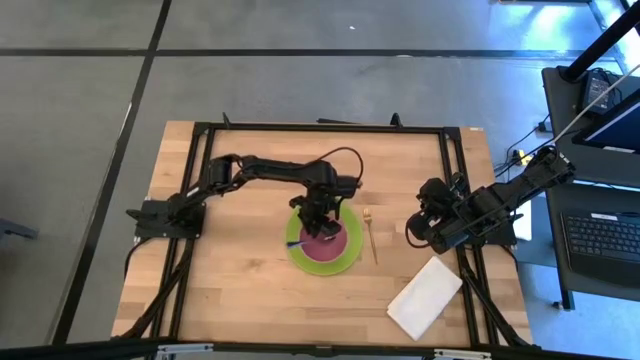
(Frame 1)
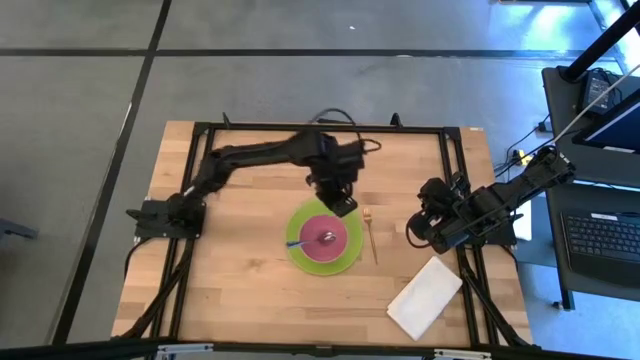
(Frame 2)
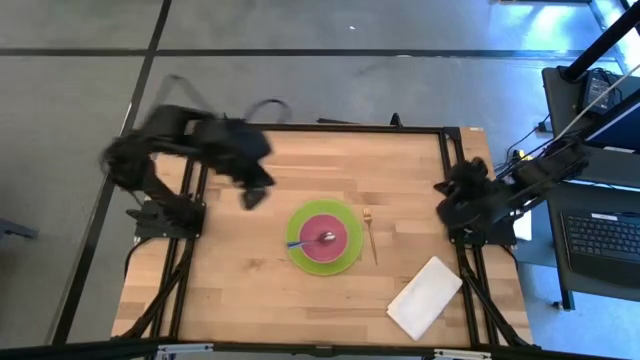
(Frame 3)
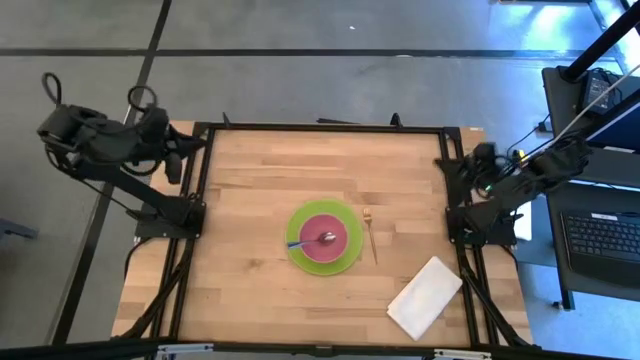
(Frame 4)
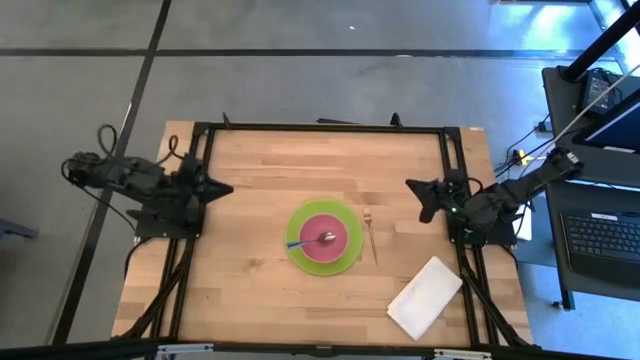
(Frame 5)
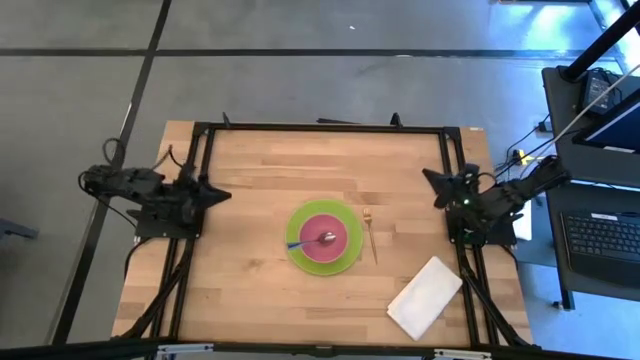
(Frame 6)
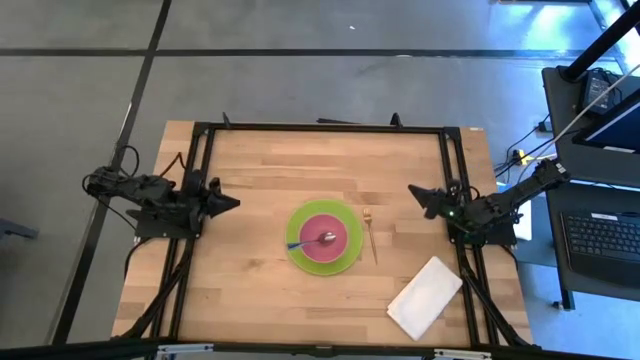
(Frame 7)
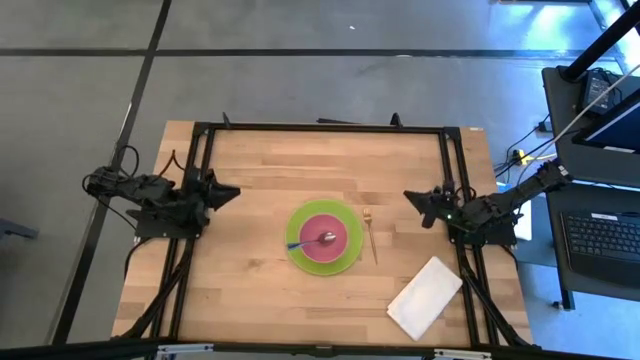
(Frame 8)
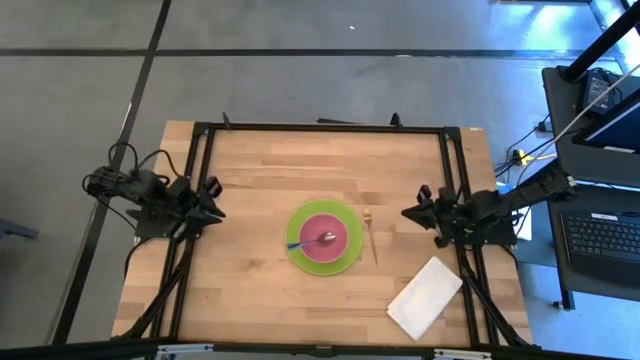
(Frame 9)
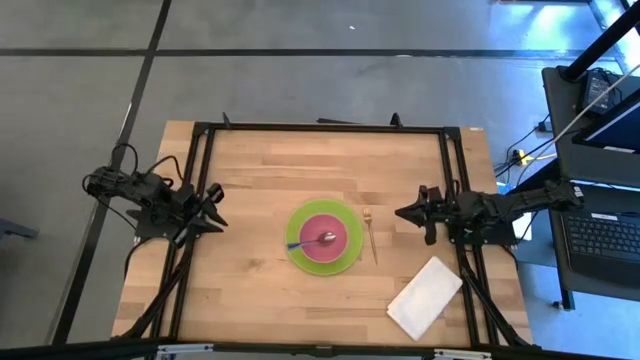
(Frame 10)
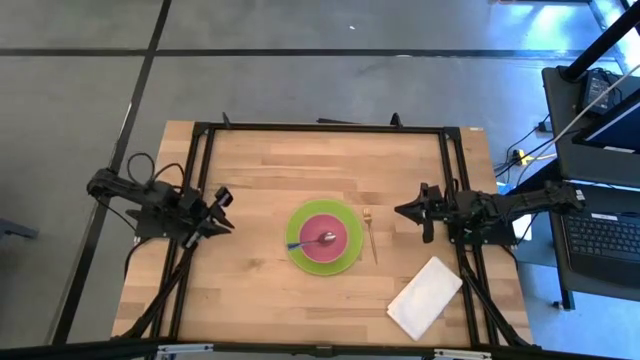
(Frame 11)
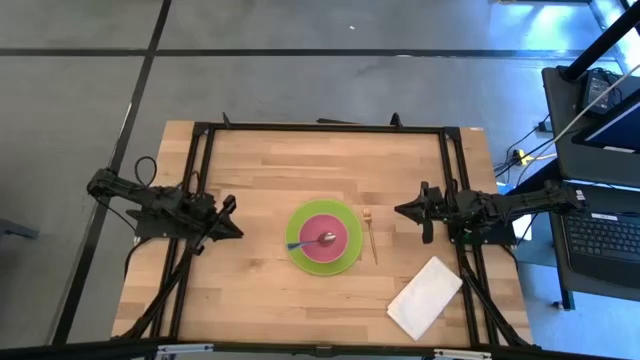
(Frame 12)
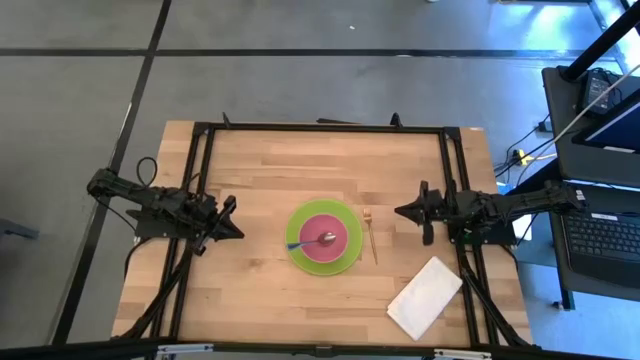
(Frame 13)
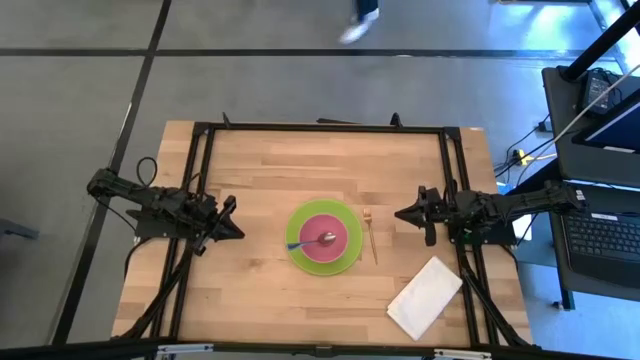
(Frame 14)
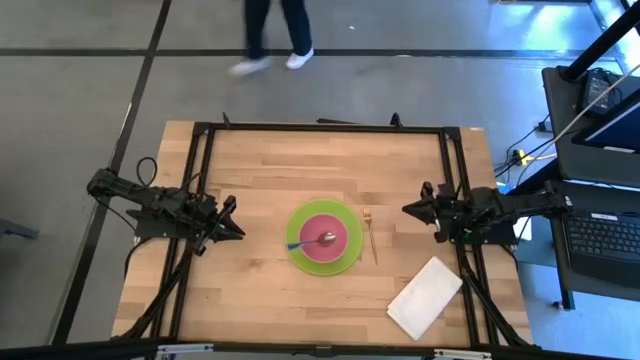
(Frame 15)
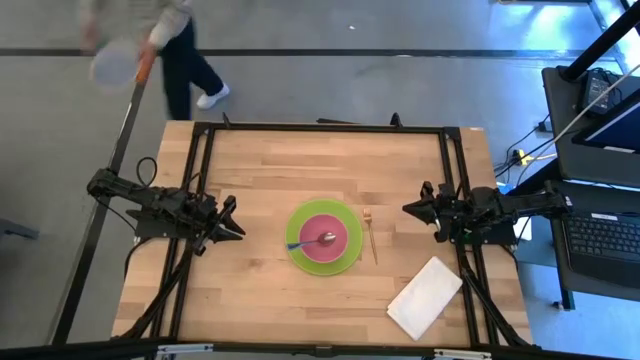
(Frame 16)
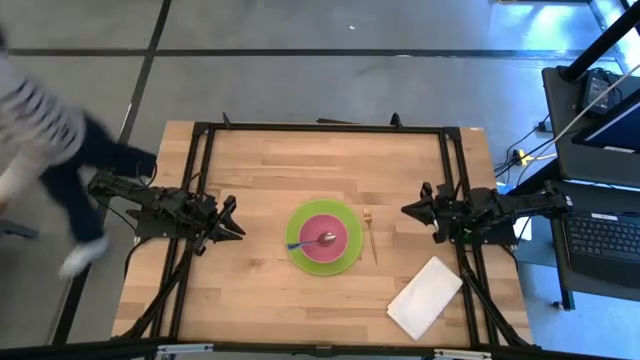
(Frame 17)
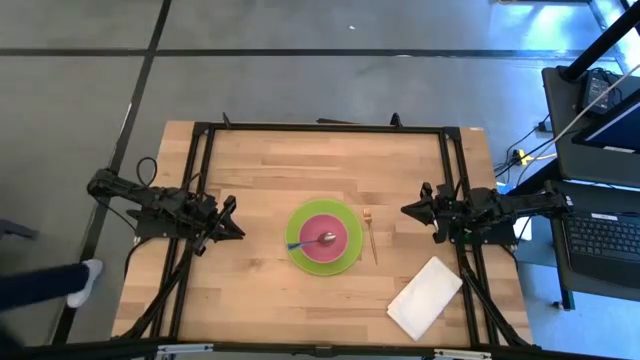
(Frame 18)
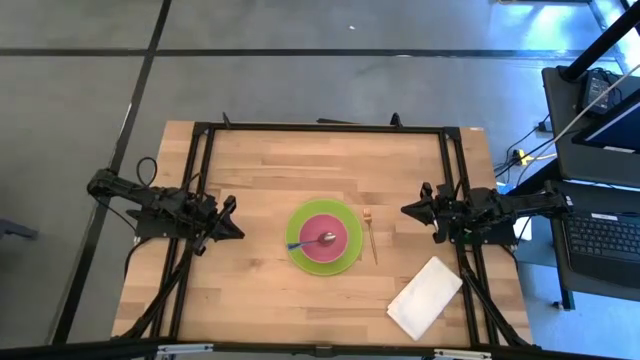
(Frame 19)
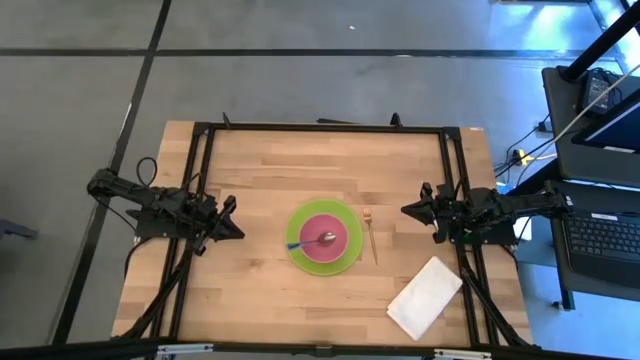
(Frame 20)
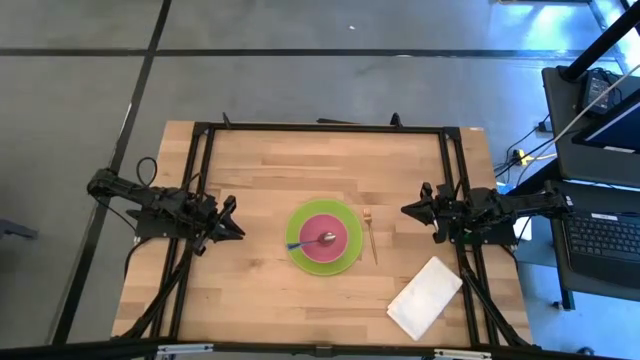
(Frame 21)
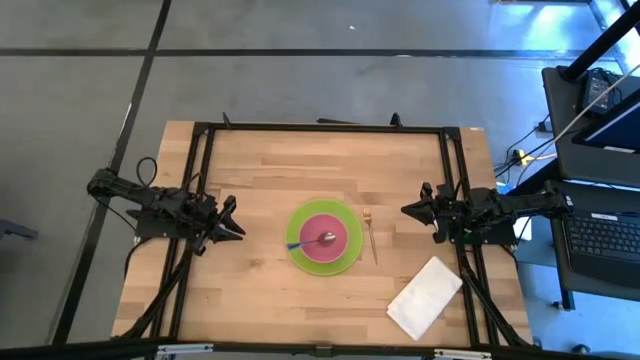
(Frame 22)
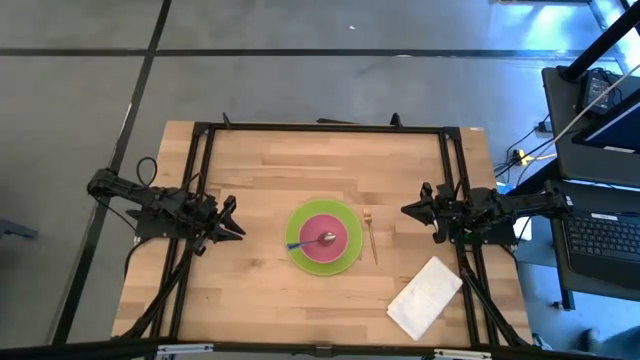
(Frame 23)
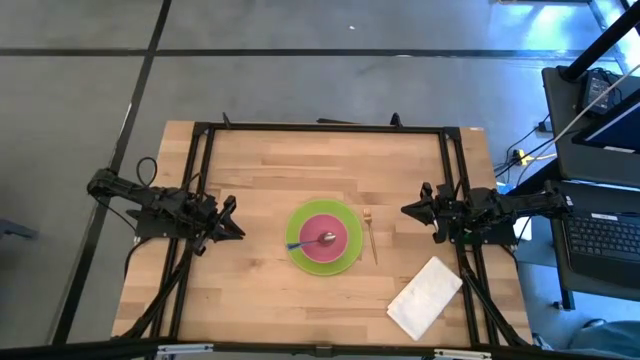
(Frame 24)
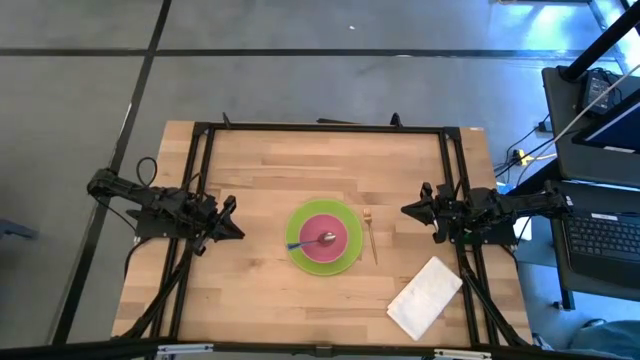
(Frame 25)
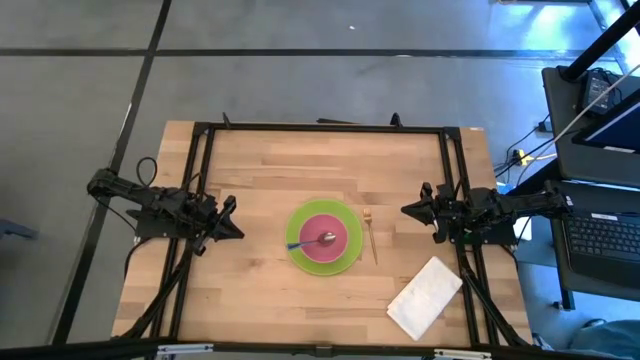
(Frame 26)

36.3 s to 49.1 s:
Task: Set table place
Return to Home Position

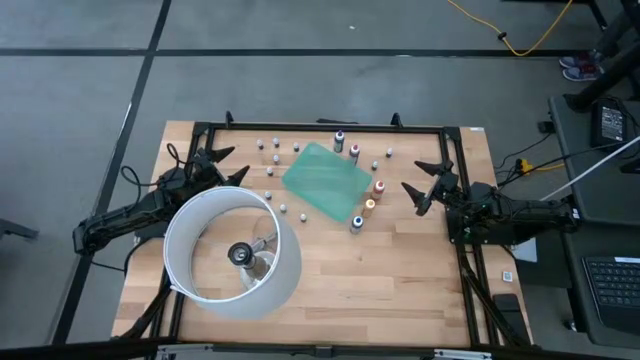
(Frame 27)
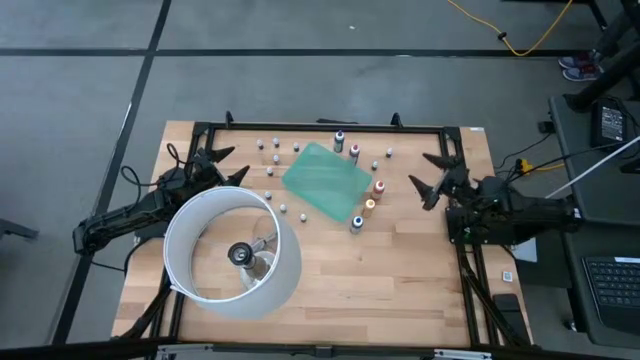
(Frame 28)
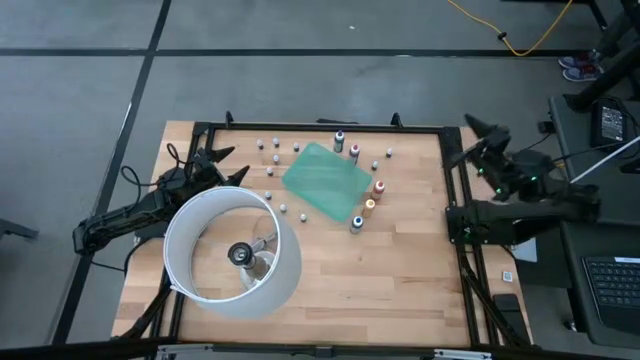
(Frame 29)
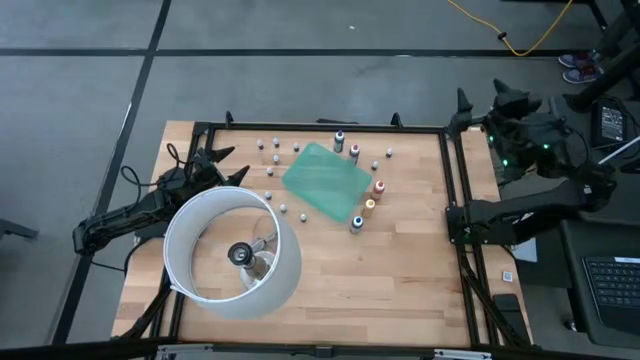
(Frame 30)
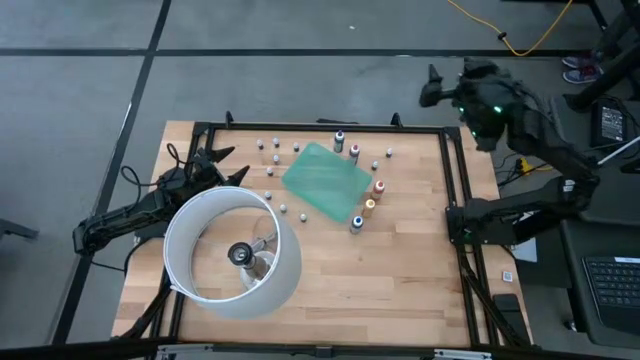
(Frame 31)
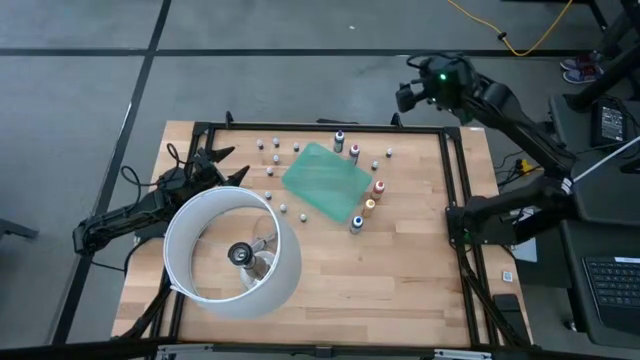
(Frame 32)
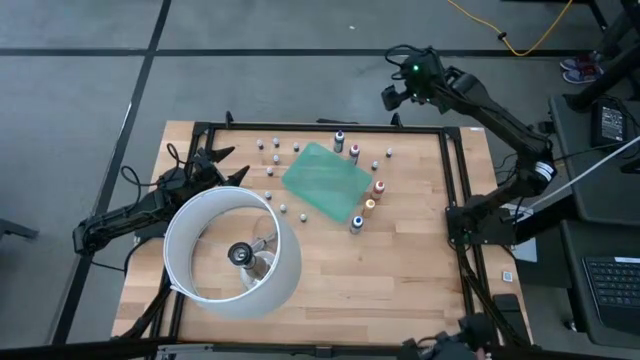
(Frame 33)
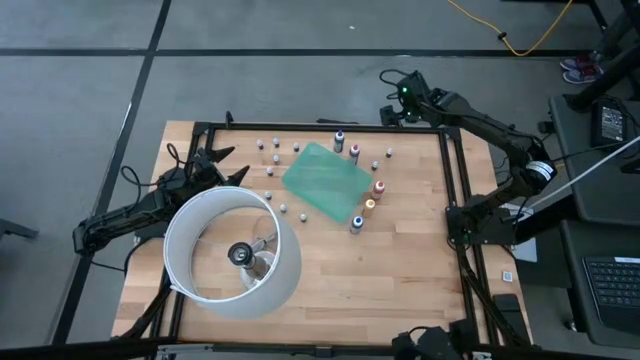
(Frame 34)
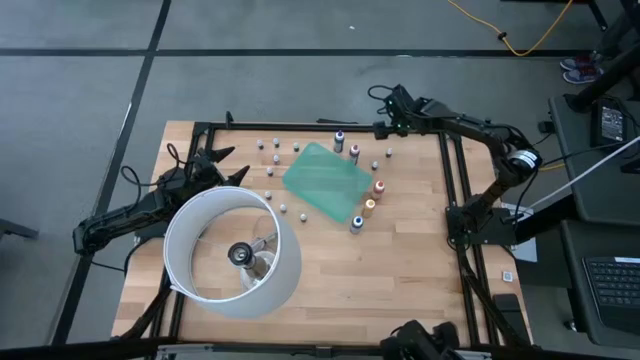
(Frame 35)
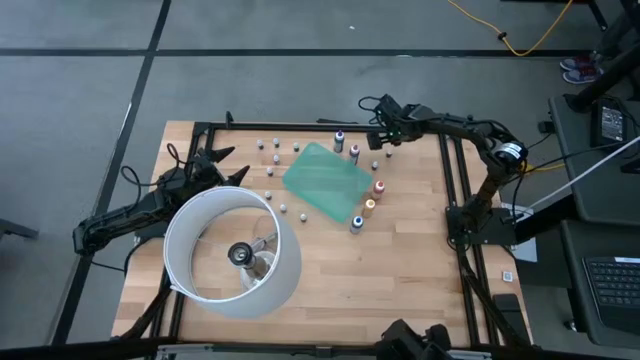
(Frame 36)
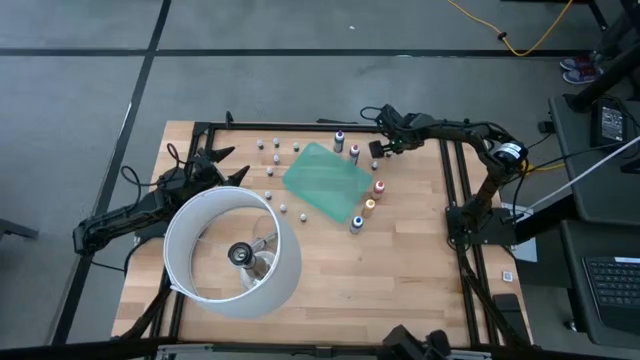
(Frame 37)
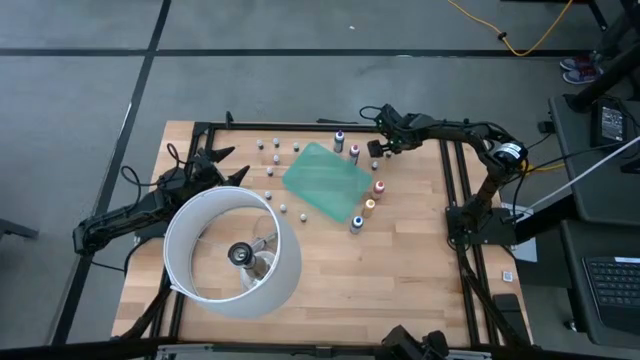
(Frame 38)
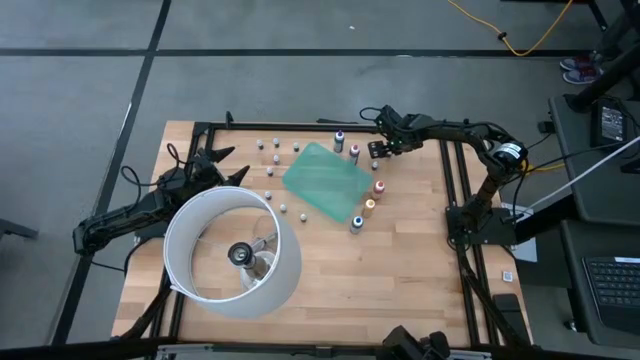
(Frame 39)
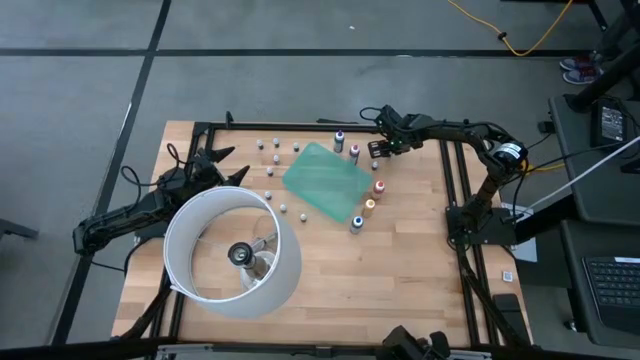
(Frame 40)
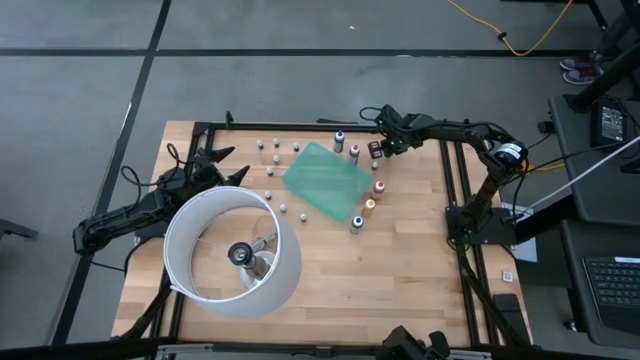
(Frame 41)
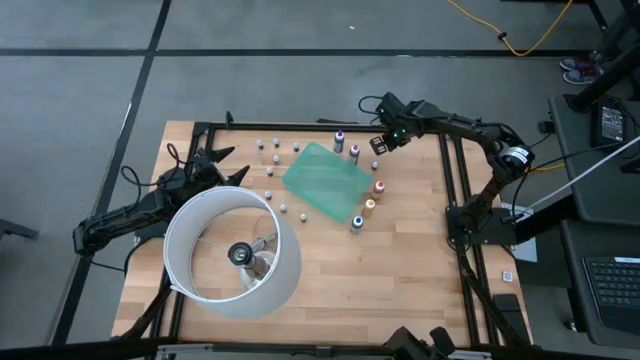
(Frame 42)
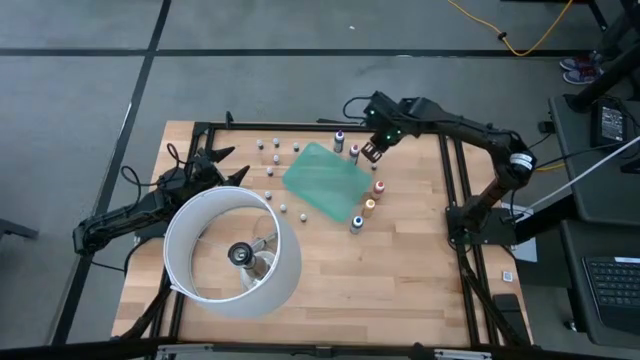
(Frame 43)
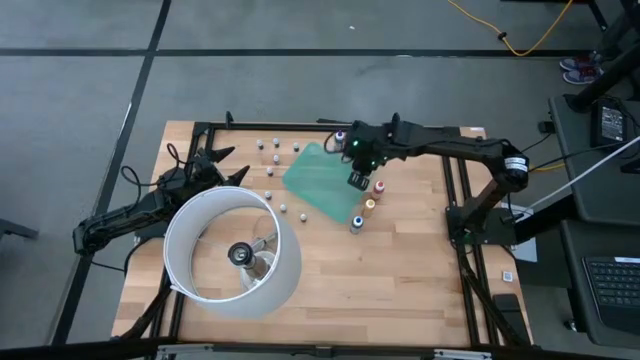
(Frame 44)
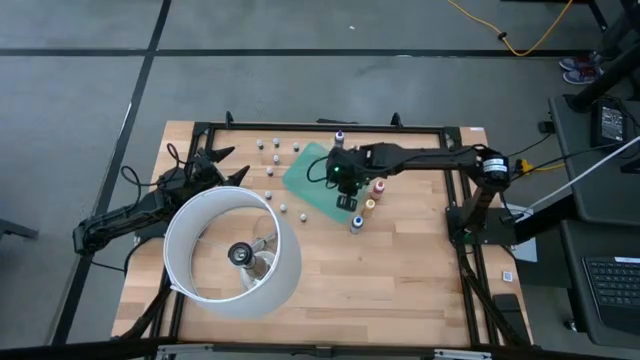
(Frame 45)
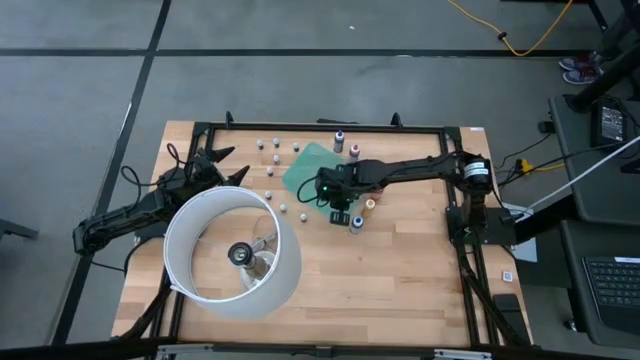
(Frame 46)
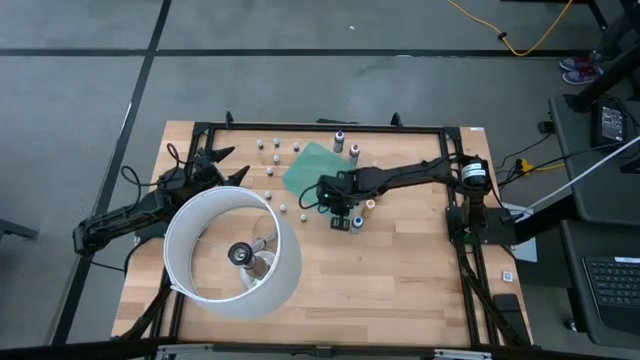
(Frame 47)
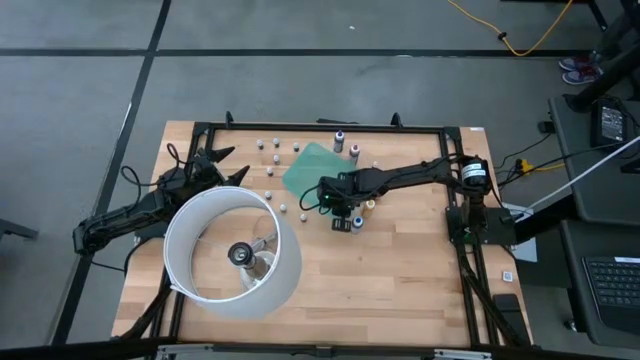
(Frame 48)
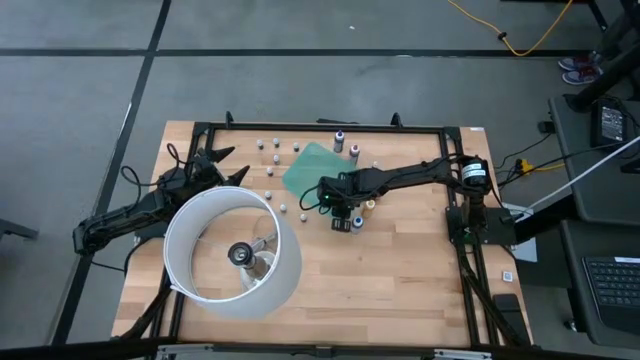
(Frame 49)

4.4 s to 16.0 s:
Task: Pick & Place food coloring
Put the small black food coloring bottle into the green bin
